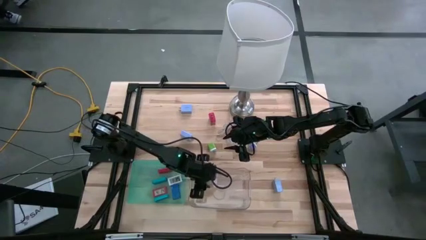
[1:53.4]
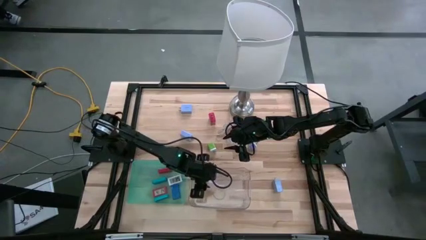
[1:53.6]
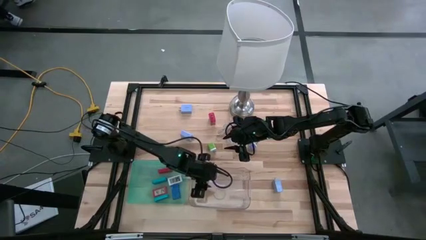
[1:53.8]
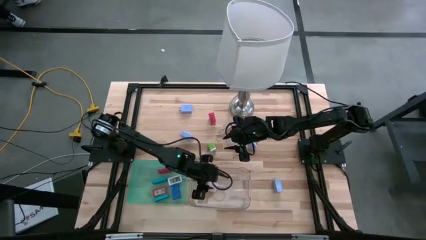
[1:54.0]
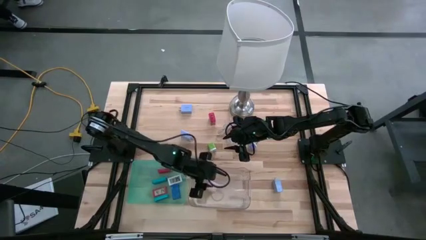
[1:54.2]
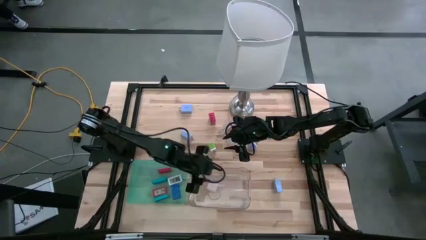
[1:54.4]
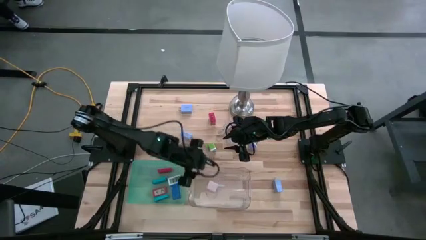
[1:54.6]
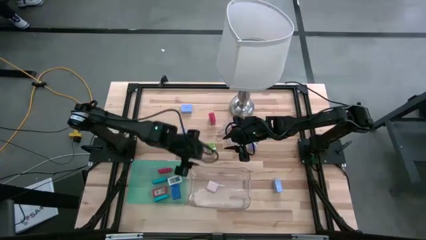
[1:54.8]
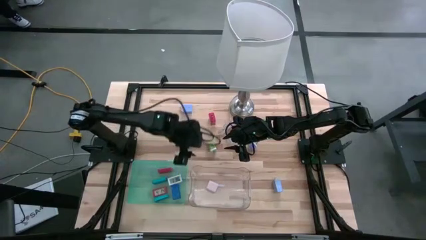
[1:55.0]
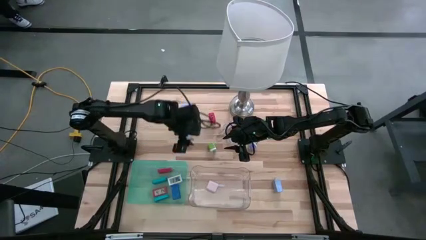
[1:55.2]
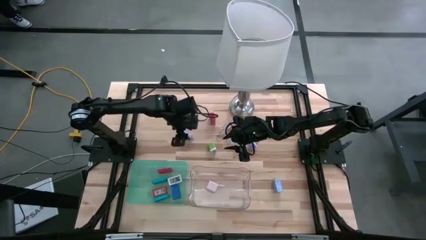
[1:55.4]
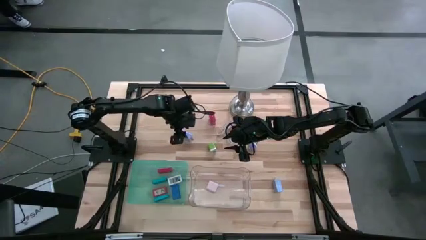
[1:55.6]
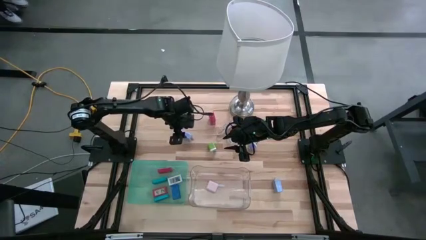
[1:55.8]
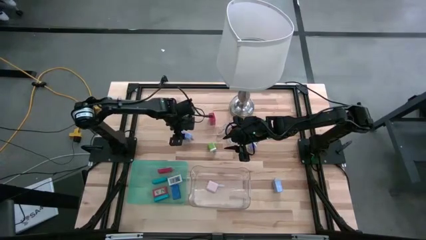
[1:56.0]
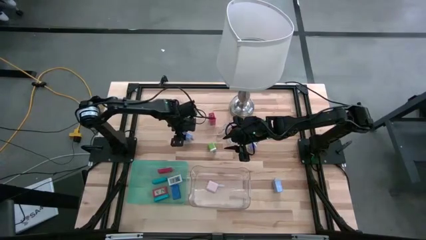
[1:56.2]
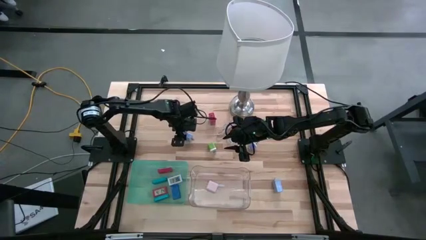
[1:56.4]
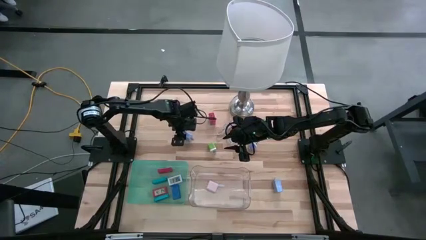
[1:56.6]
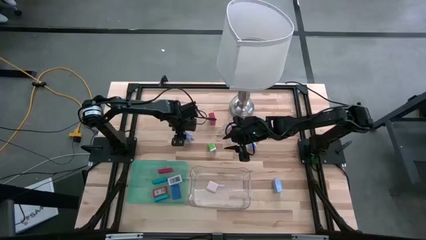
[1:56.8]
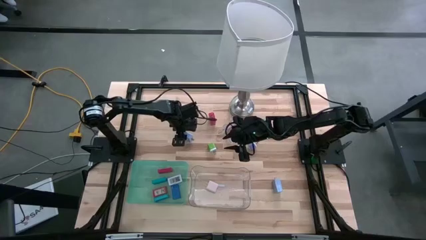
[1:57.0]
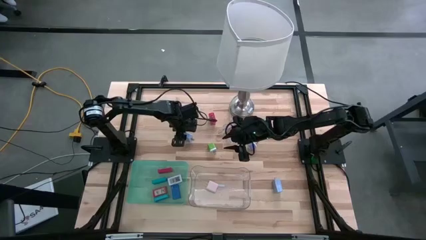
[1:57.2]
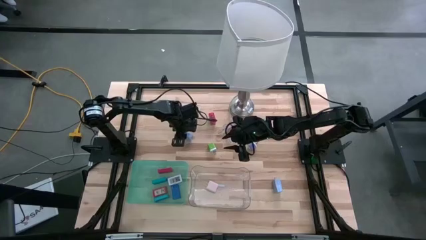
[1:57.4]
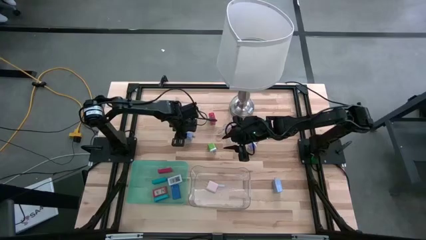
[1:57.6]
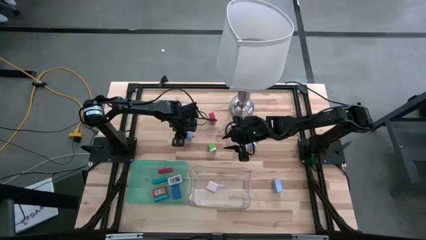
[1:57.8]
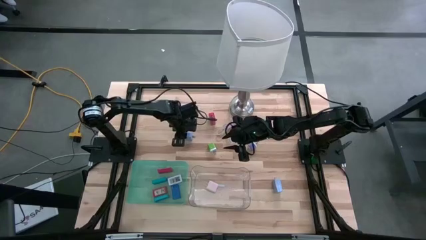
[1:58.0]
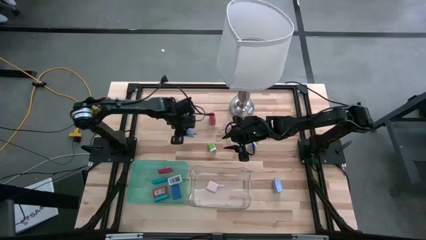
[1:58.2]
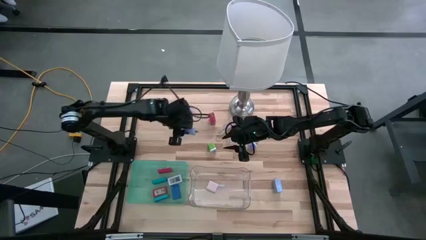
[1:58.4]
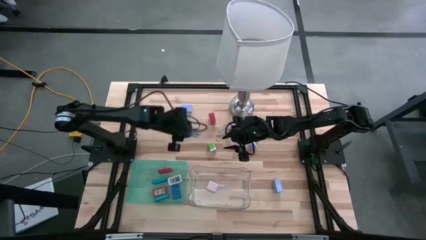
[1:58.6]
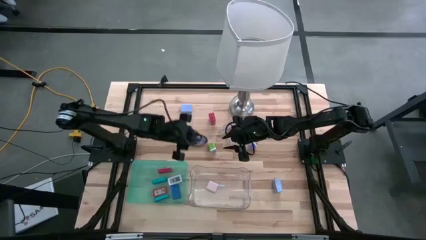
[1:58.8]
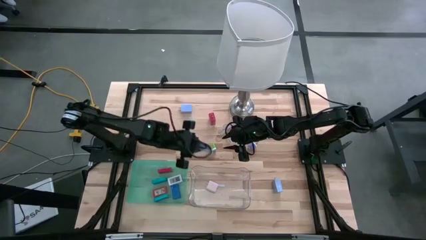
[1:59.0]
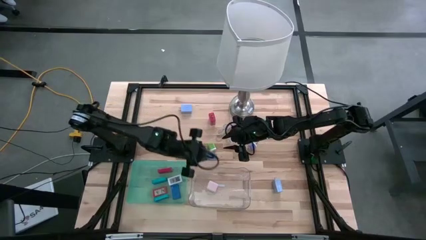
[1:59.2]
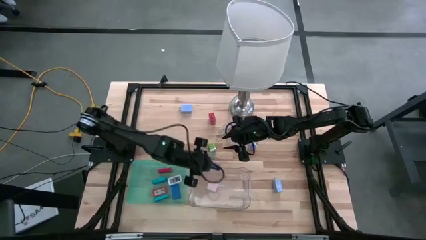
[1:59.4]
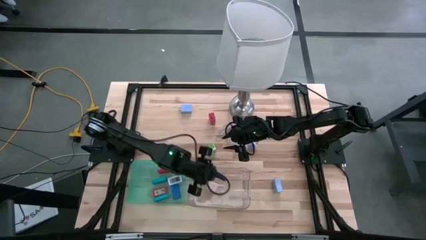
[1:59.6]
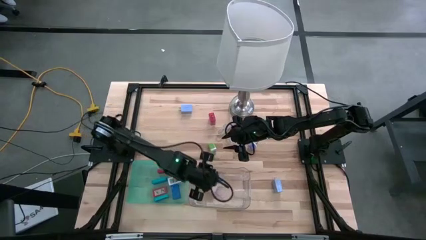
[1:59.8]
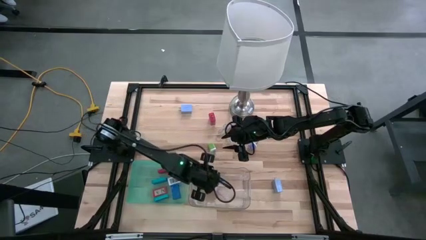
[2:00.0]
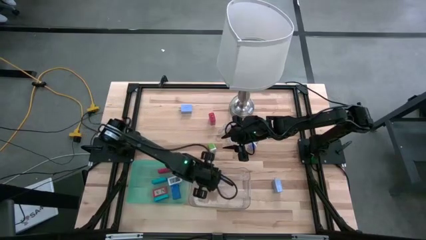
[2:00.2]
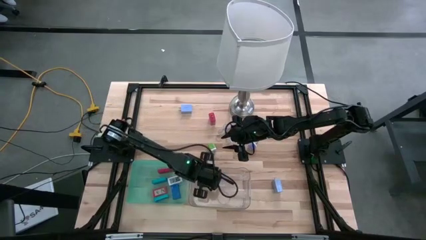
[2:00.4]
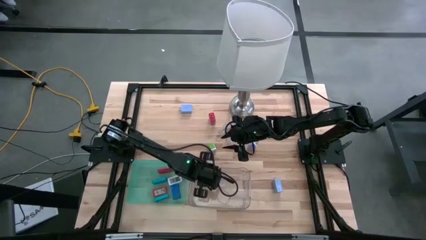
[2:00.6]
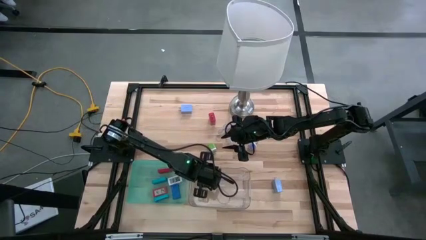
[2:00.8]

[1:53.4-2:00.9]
Task: Pick & Place Office items
Put the middle left purple charger adapter into the transparent bin

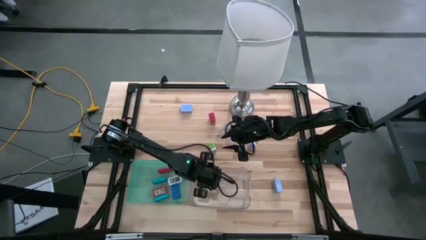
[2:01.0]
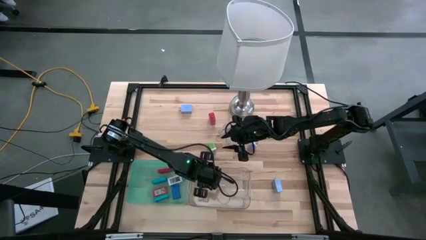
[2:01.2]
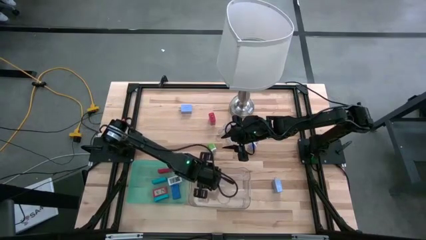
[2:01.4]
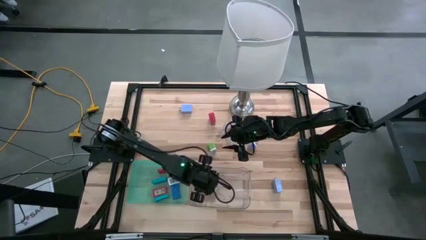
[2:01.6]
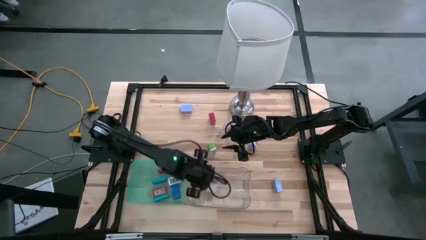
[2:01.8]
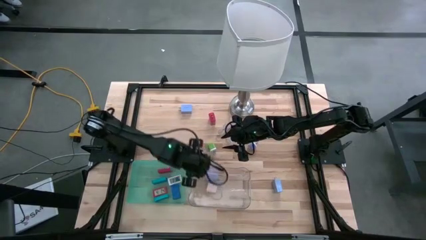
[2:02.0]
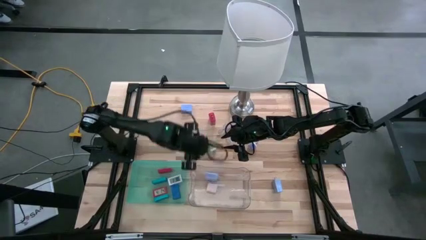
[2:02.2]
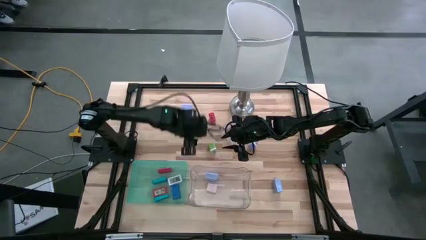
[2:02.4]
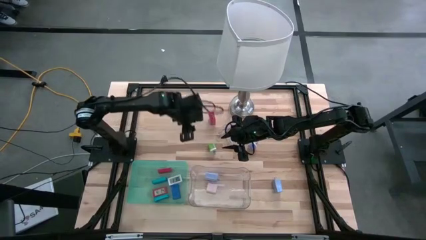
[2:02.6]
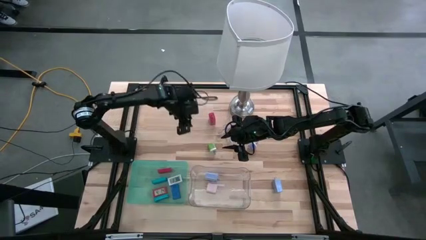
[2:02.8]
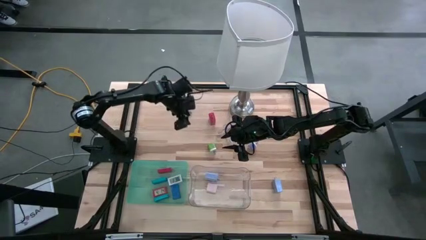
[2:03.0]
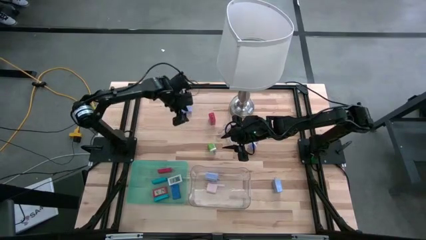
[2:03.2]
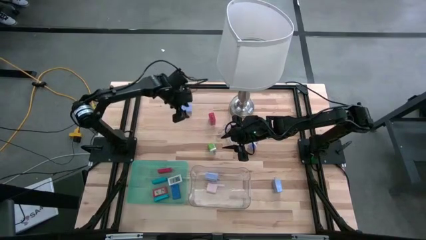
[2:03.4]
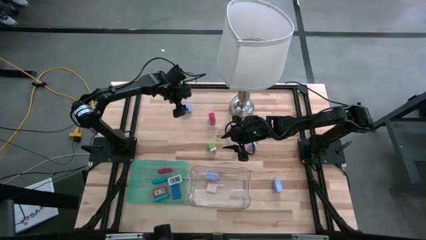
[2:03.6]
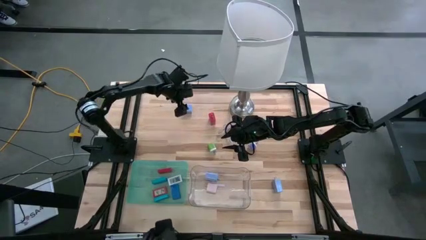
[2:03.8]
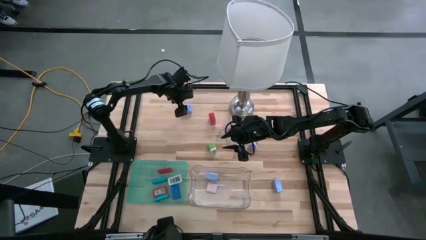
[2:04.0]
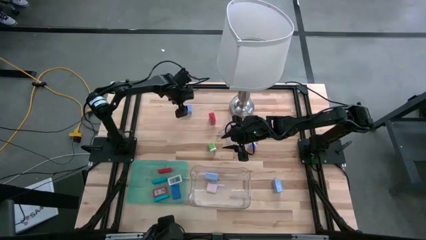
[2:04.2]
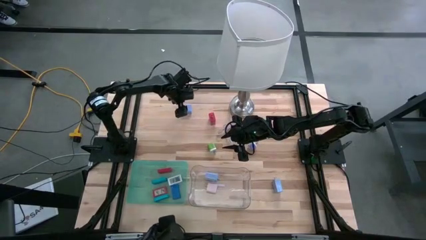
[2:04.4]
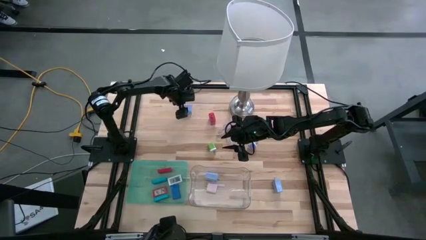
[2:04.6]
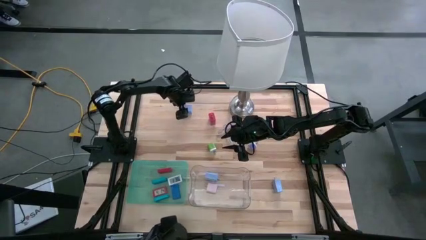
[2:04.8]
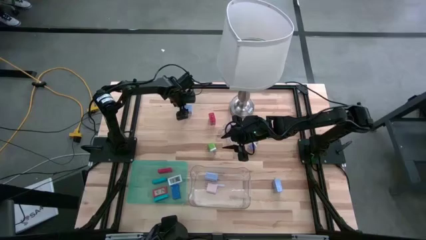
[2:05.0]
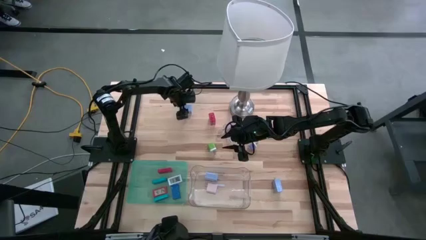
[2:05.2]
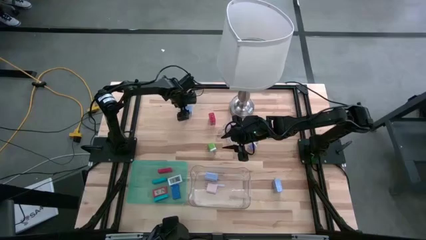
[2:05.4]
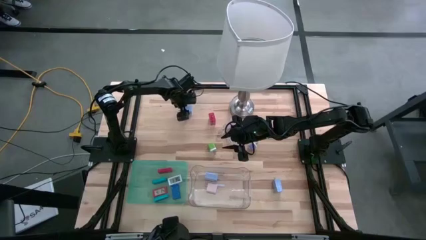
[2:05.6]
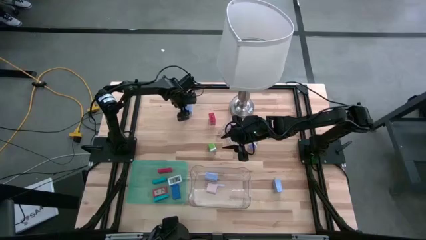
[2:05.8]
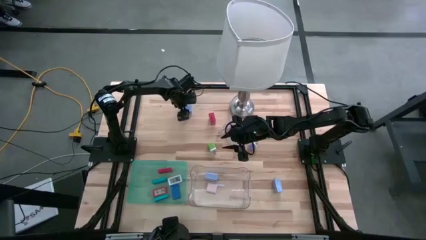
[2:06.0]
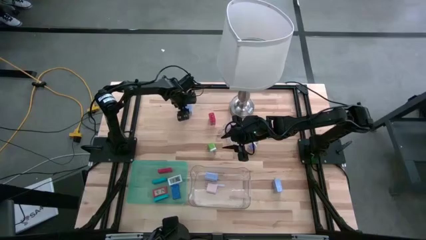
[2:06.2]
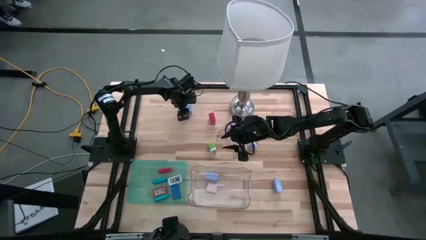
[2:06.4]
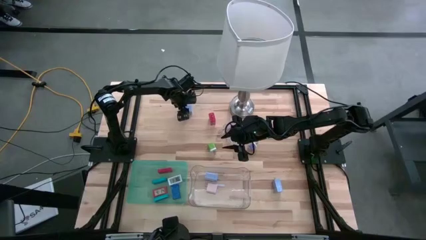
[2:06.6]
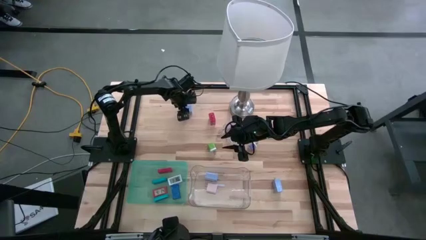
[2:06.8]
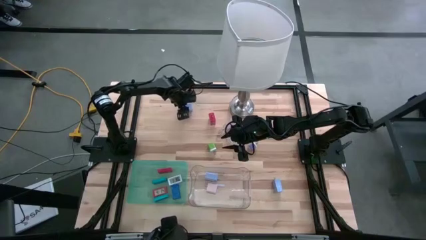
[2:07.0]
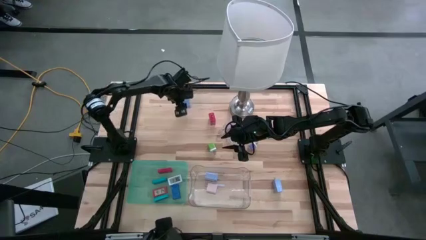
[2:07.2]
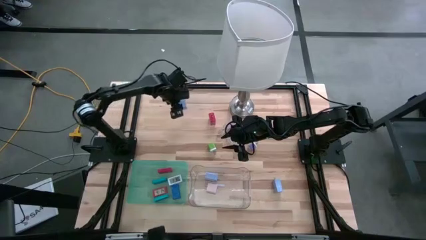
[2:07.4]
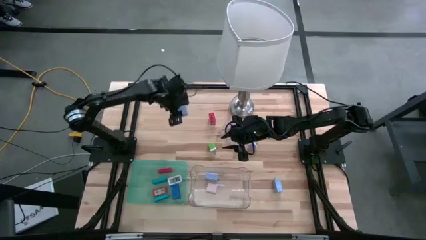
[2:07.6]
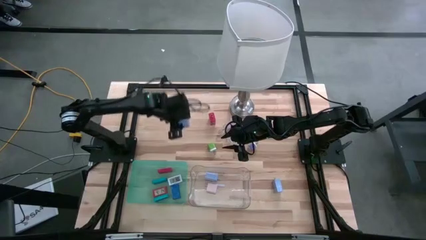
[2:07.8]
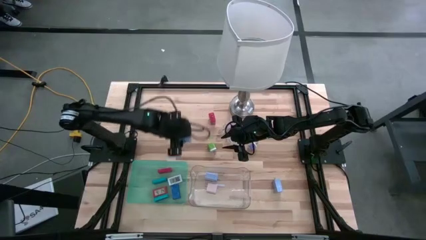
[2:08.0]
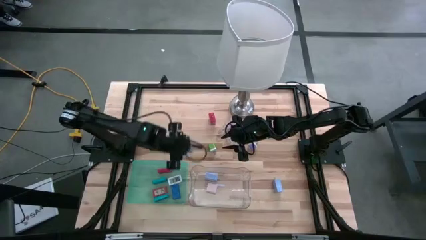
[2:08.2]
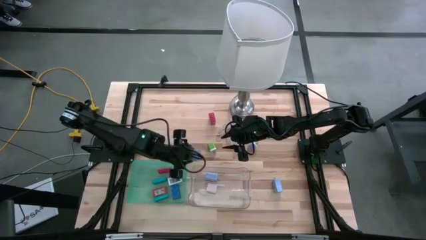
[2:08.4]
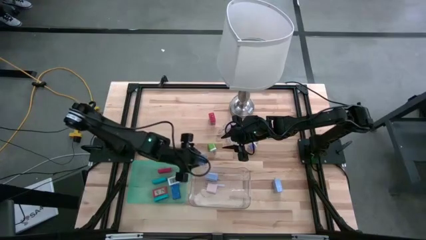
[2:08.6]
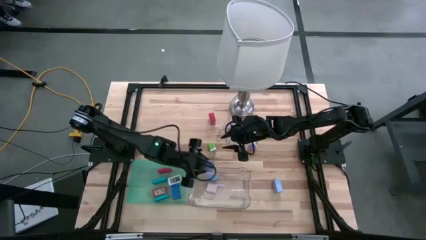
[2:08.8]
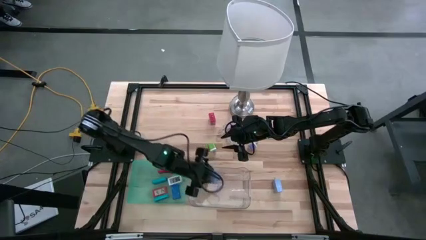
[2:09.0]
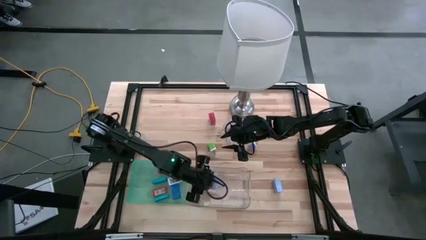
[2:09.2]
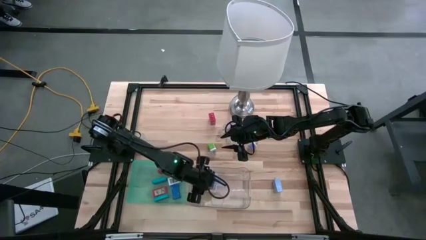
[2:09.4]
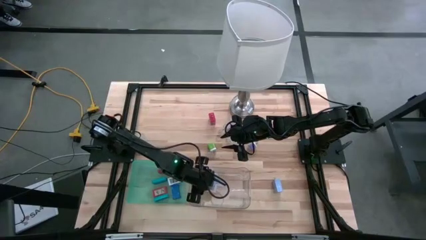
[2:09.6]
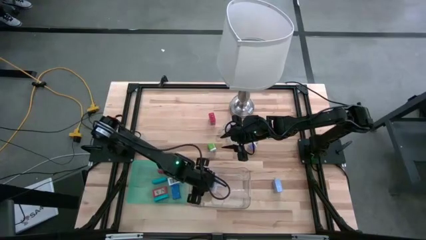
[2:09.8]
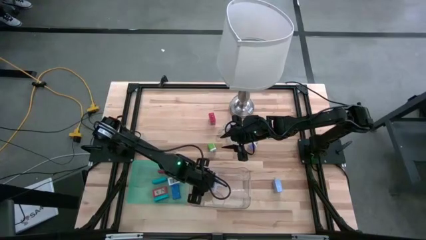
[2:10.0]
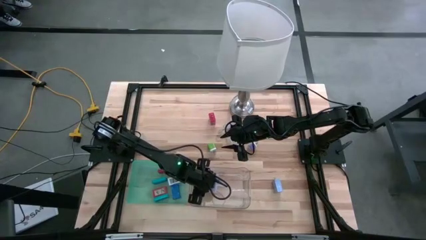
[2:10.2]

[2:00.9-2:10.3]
Put the top purple charger adapter into the transparent bin
